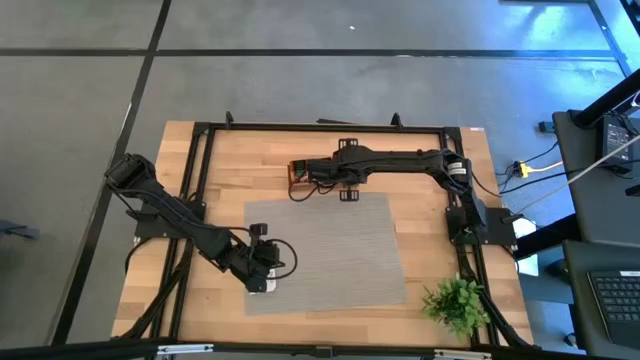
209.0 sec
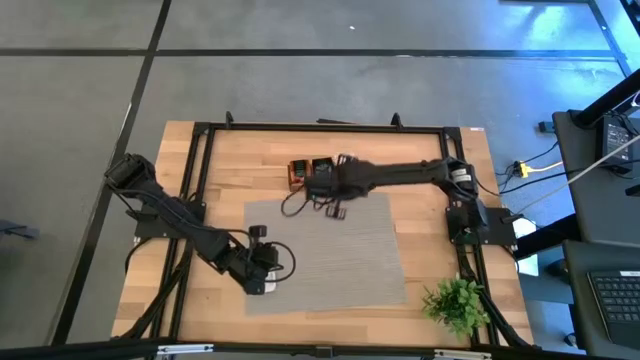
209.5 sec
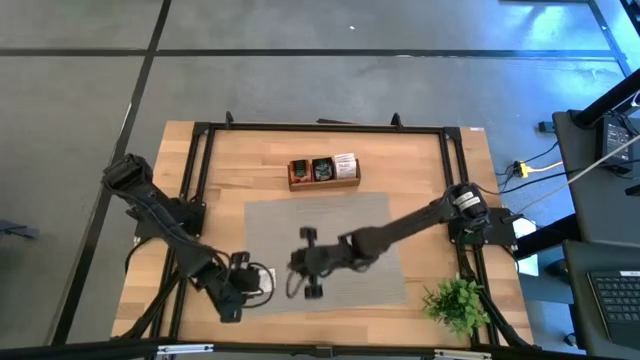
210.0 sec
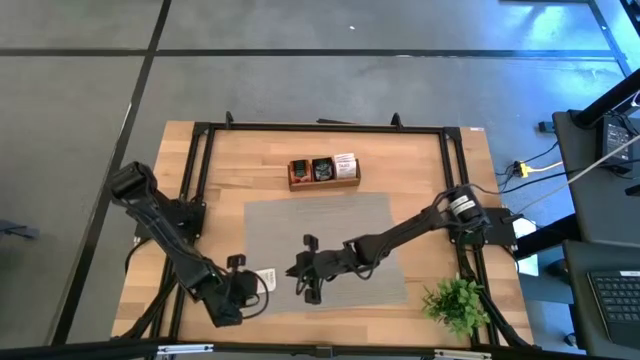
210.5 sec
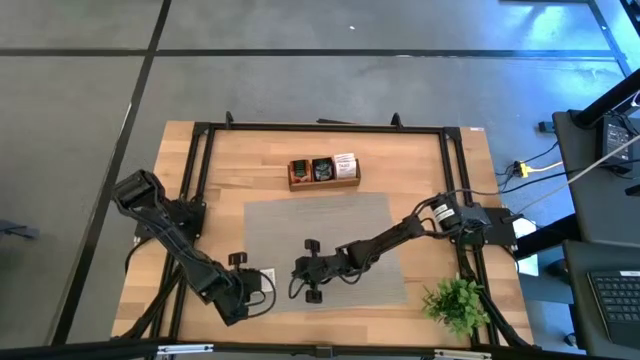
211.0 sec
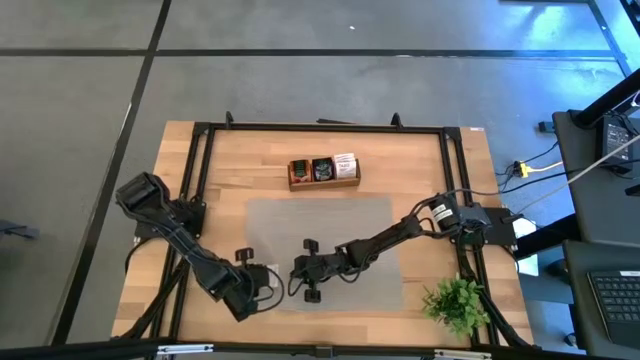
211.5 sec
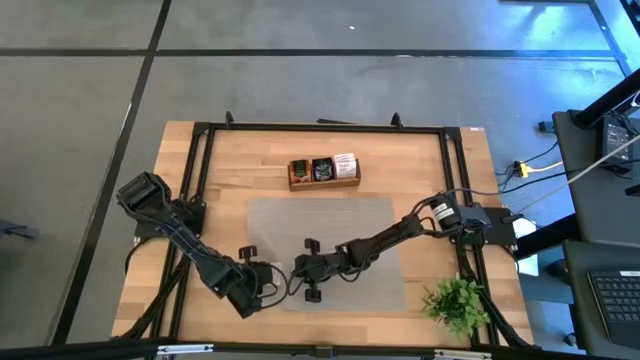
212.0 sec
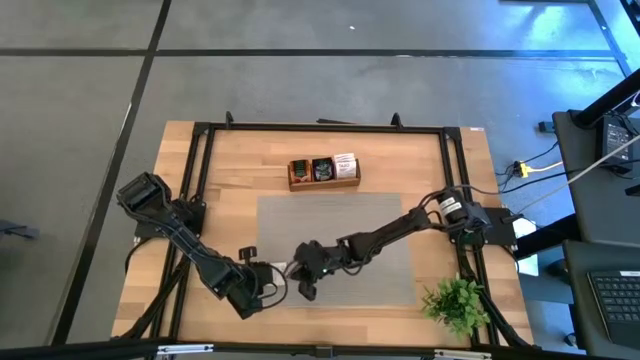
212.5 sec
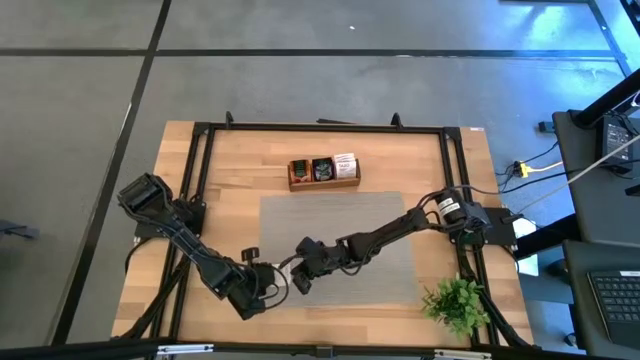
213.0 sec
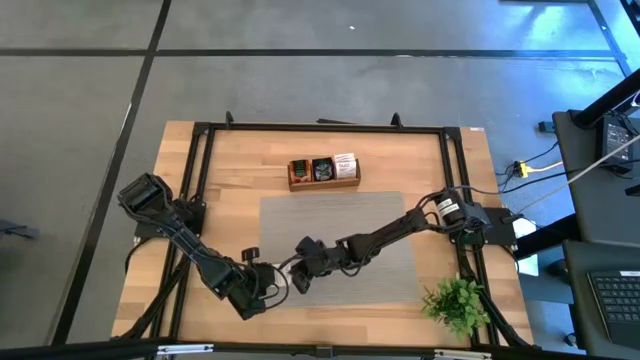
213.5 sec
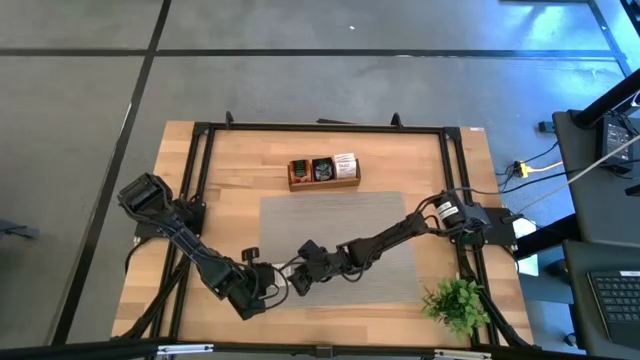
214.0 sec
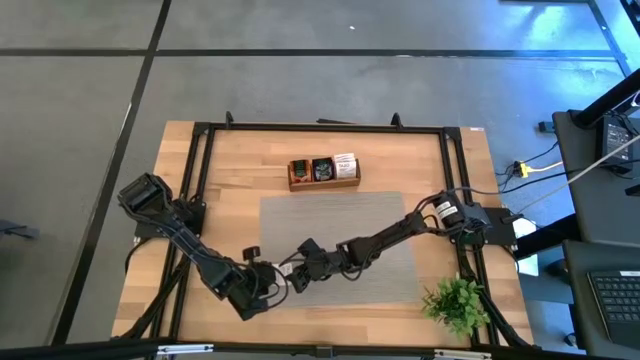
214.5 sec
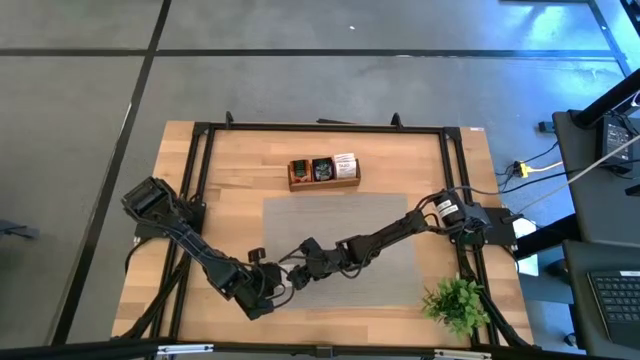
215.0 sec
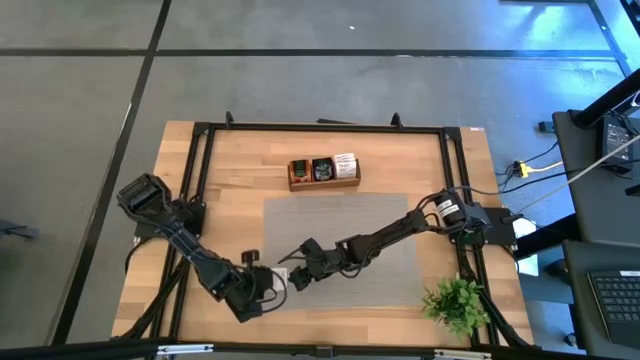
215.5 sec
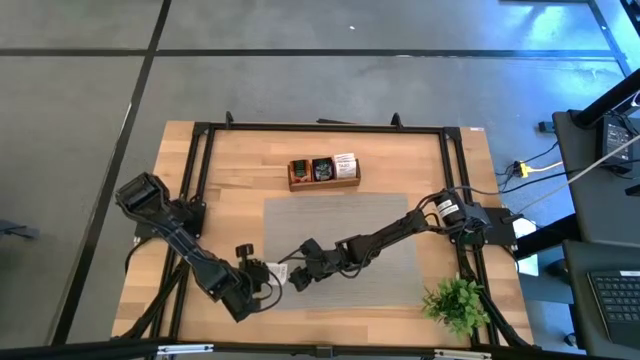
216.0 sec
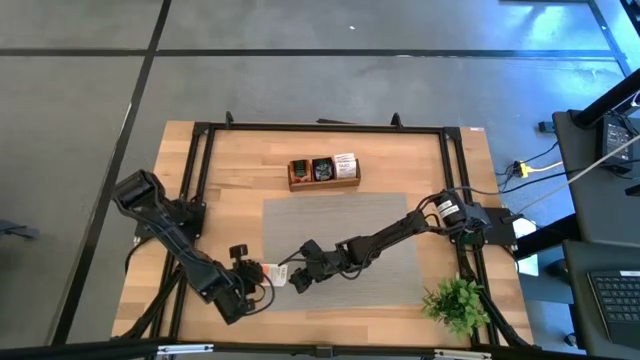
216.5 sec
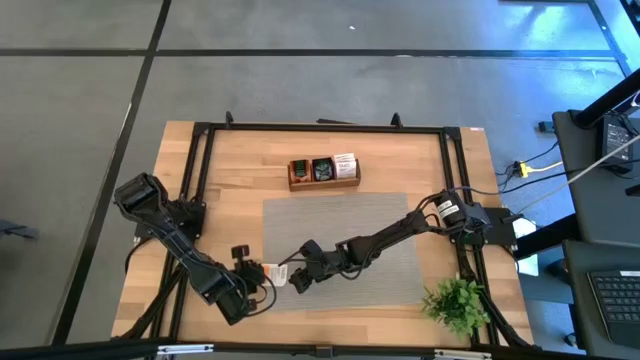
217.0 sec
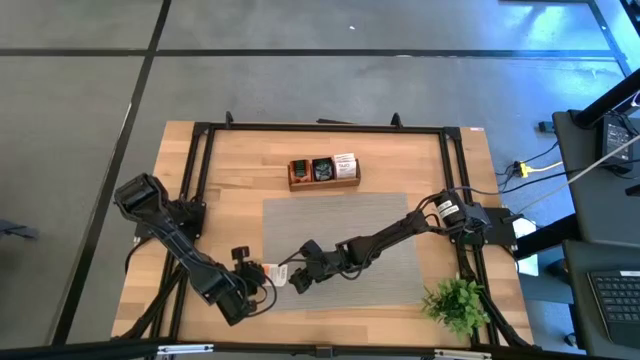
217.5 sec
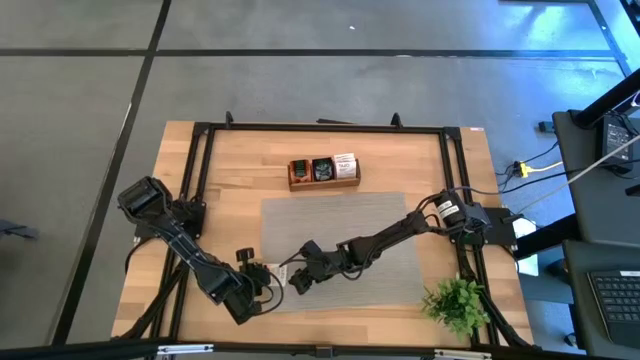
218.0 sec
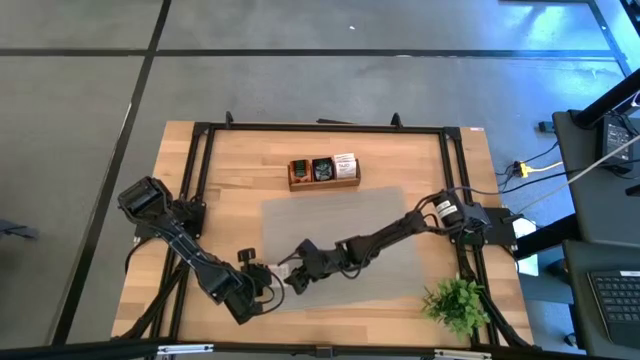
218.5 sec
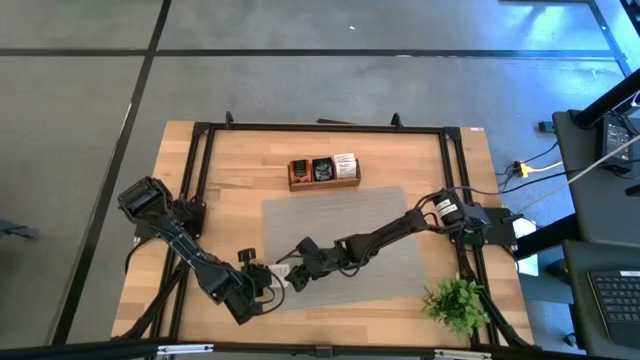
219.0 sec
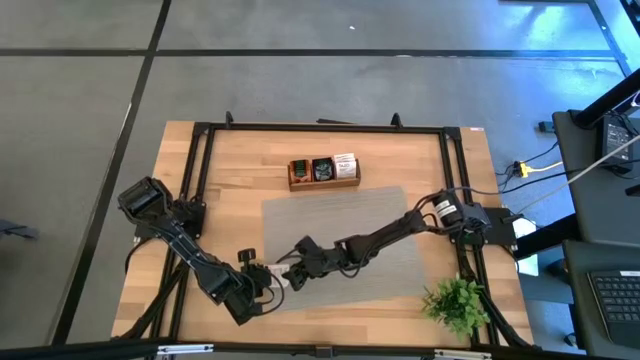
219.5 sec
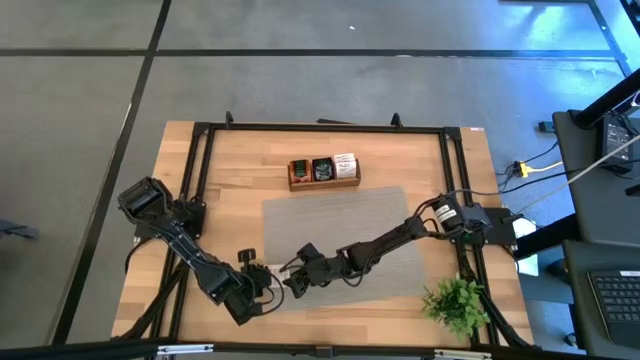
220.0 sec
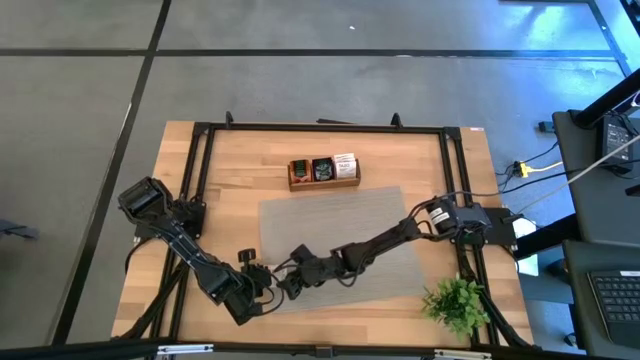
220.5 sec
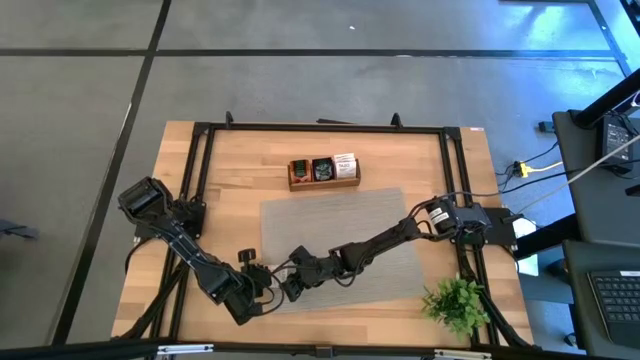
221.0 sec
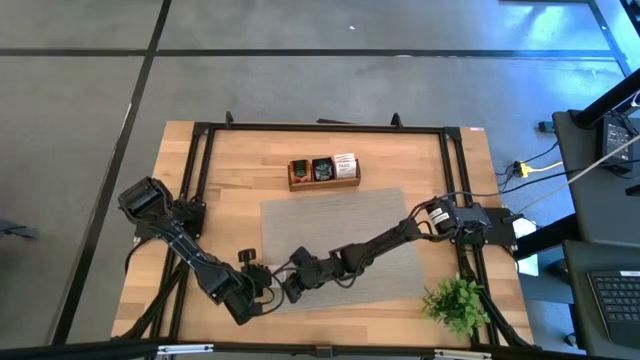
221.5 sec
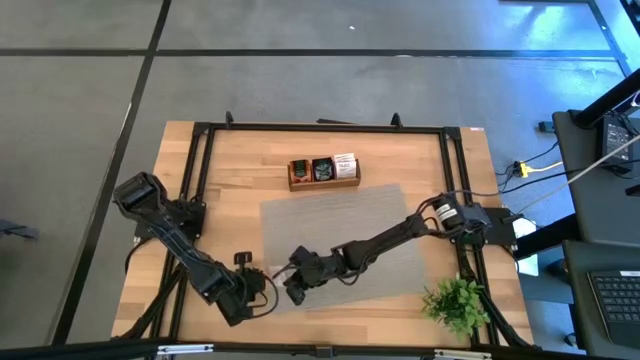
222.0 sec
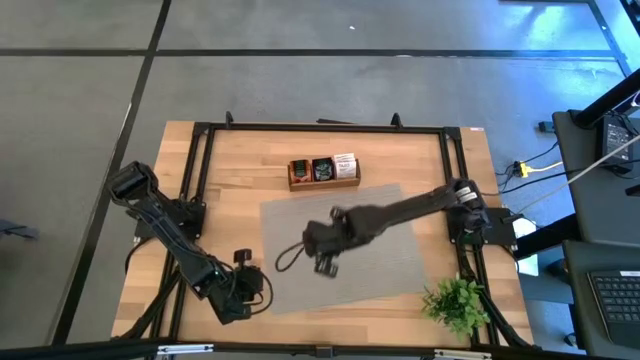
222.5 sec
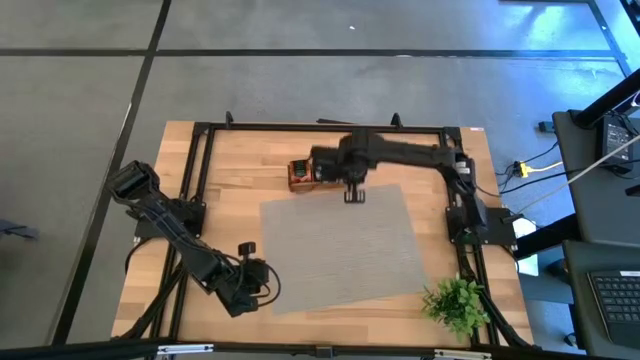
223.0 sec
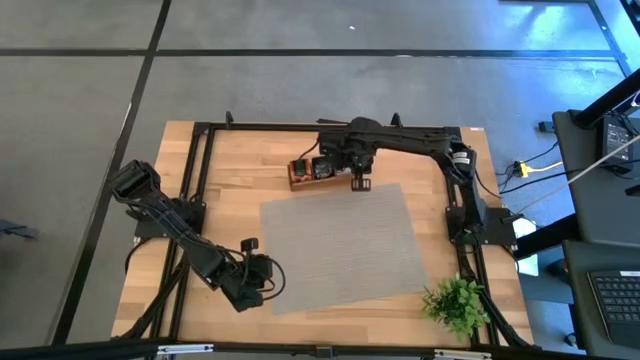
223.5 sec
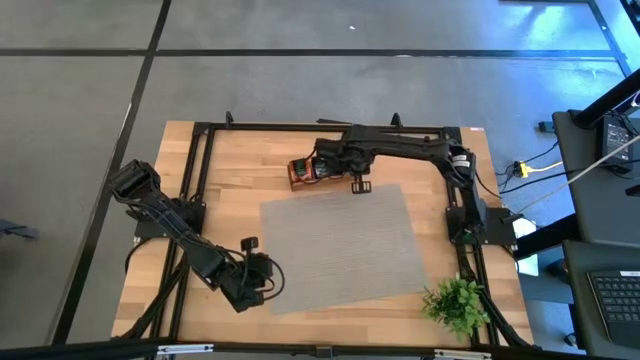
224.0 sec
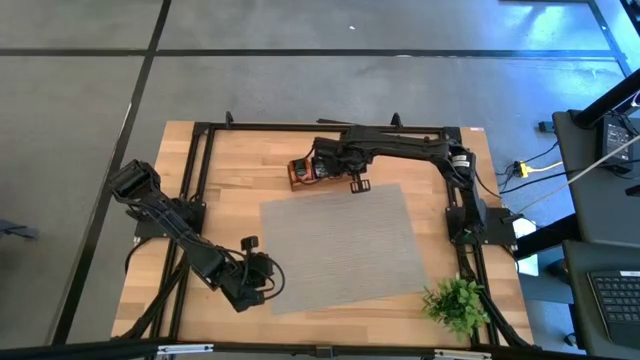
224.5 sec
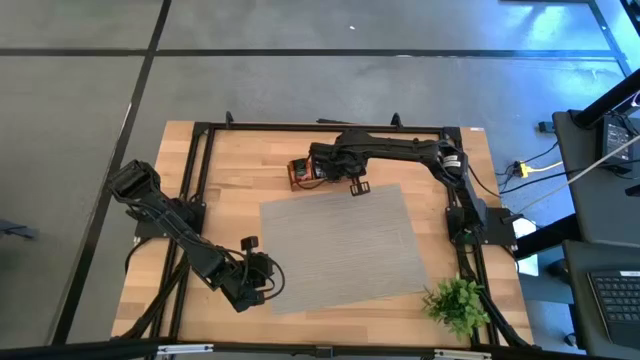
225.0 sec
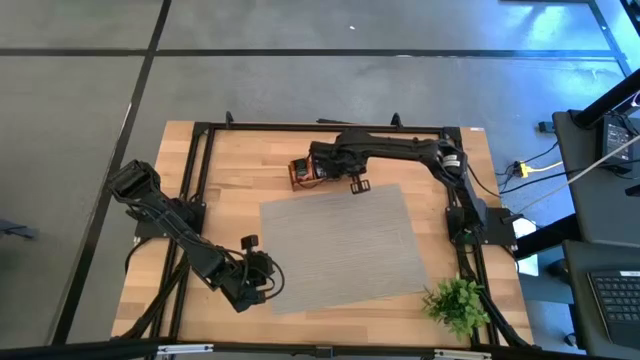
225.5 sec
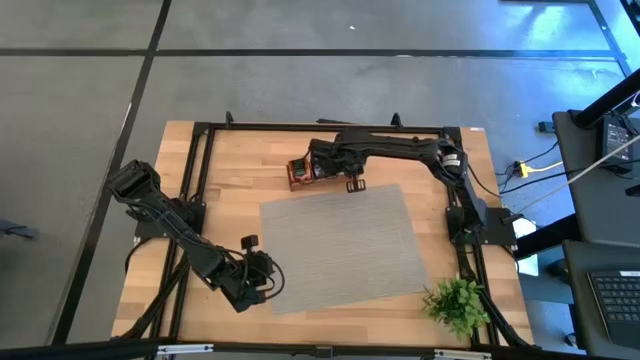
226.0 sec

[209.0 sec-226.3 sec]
Task: Pick & Place Tea
Put the white orange tea bag into the right section of the wooden organizer

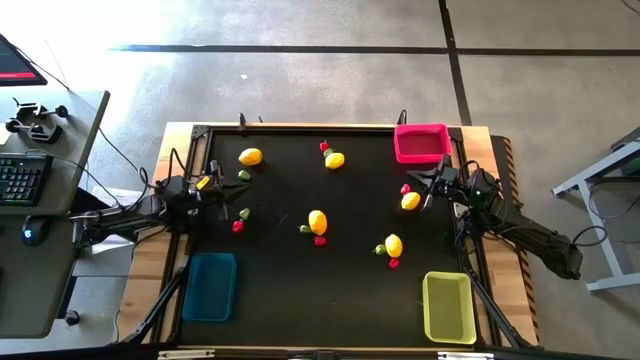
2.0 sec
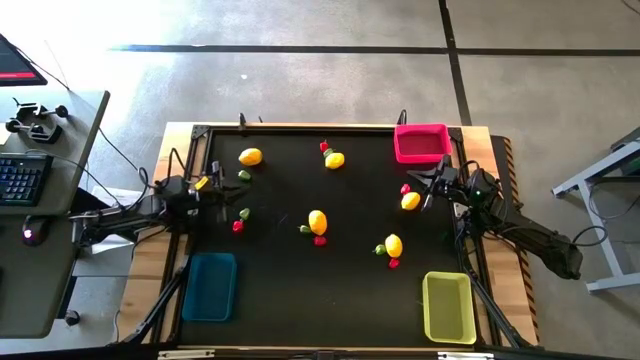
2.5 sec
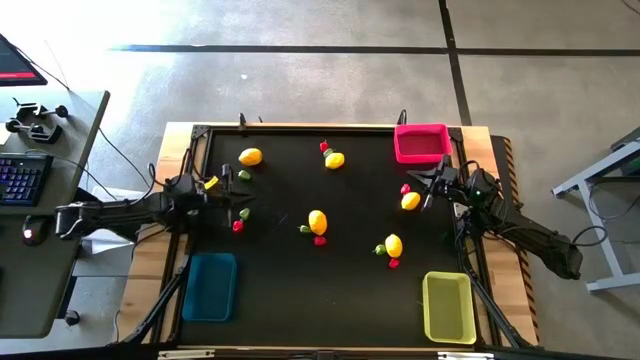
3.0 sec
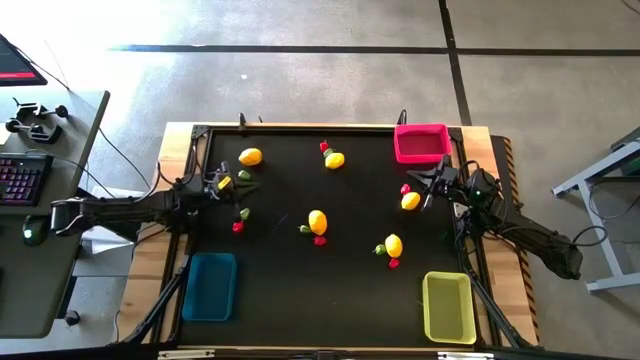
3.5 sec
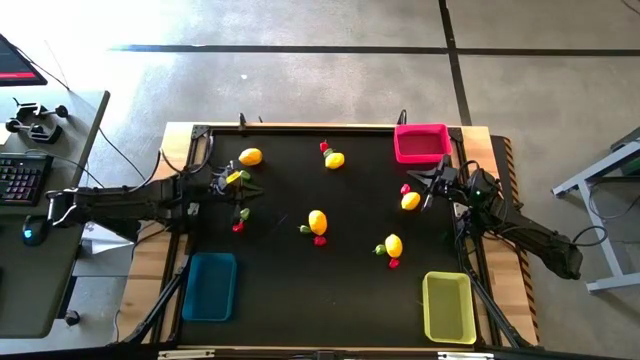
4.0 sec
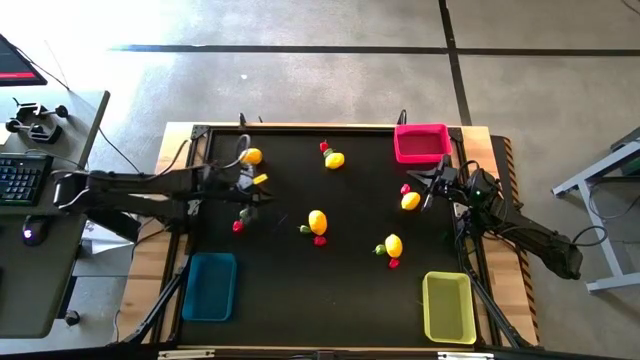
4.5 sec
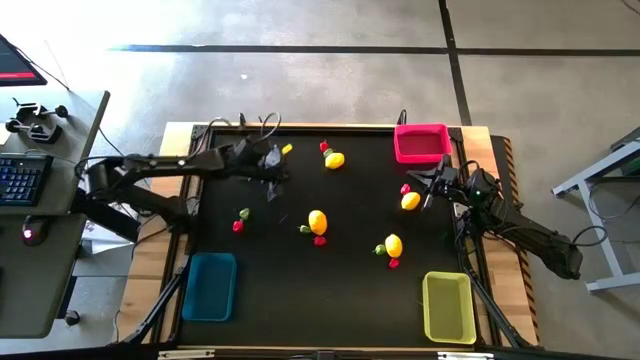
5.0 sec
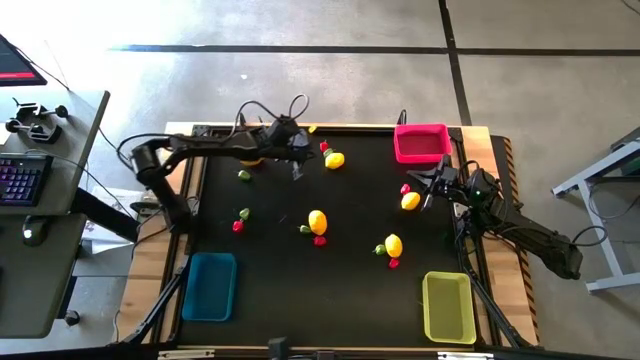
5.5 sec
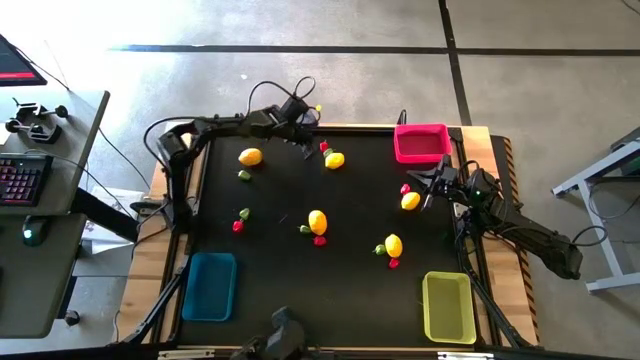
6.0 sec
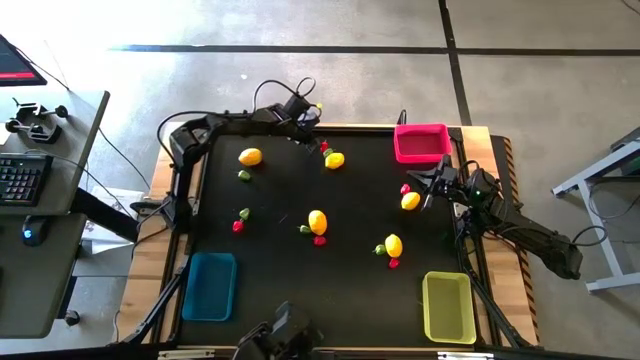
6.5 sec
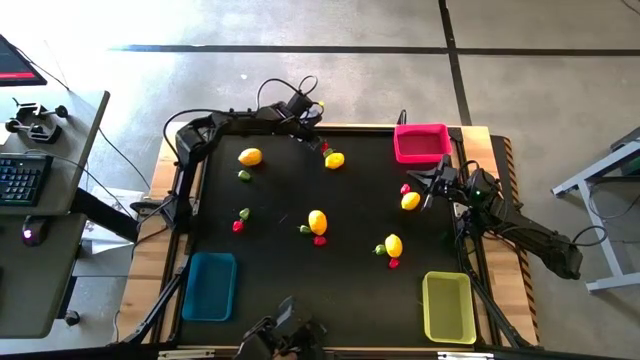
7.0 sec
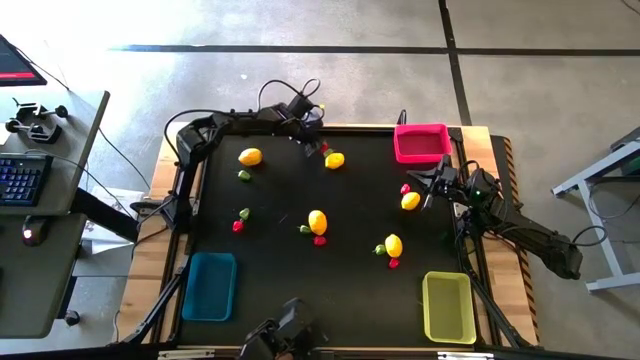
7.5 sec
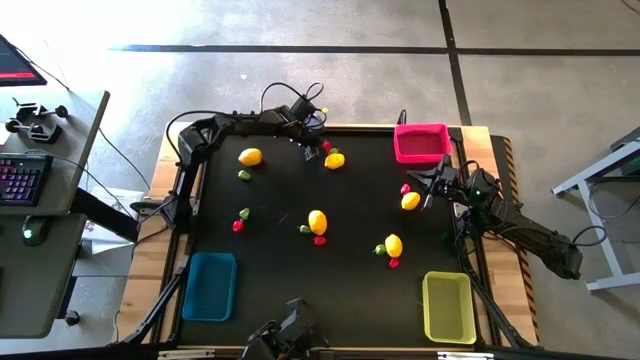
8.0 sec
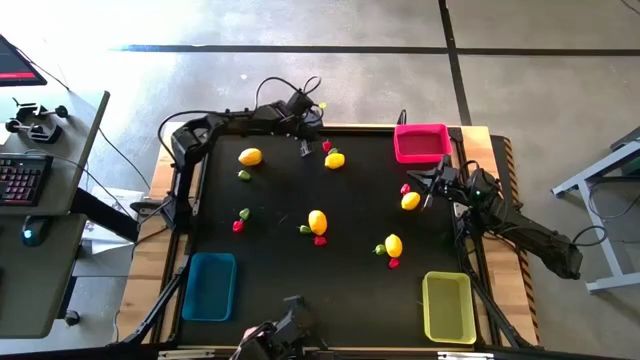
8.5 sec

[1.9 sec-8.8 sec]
Task: Sort produce into baskets
Put the red chilli pepper into the blue bin
